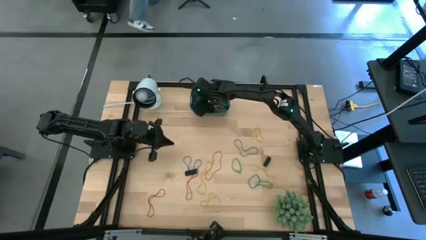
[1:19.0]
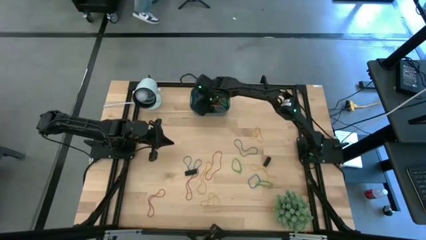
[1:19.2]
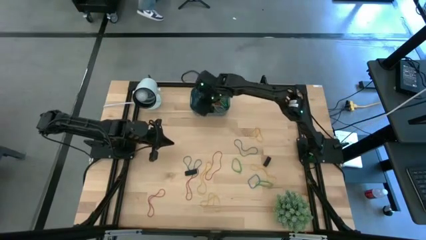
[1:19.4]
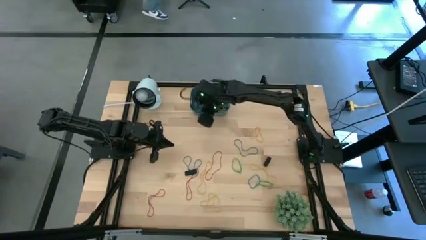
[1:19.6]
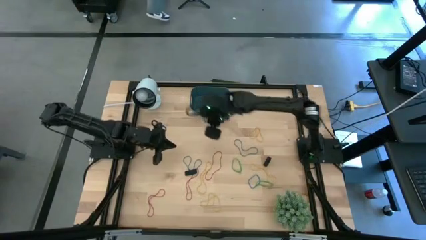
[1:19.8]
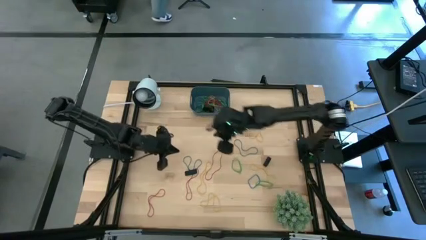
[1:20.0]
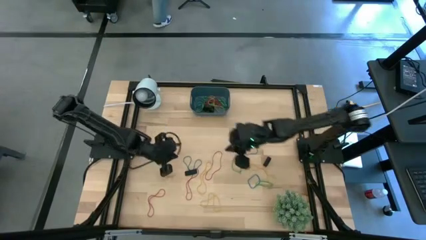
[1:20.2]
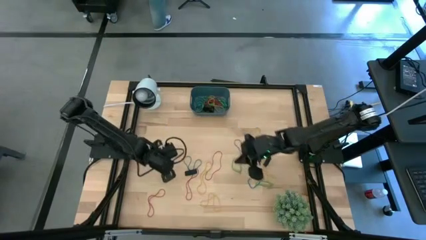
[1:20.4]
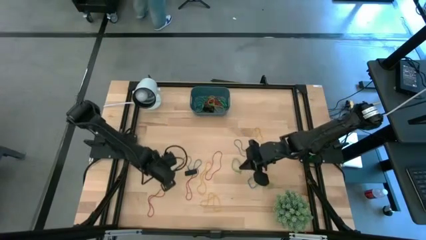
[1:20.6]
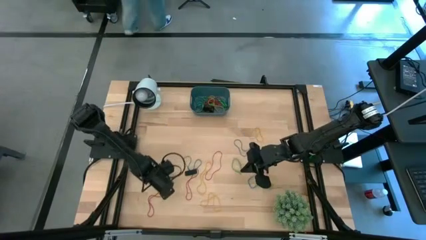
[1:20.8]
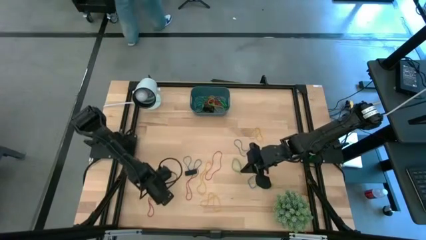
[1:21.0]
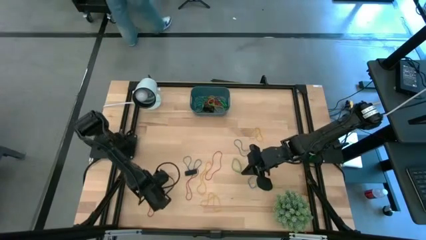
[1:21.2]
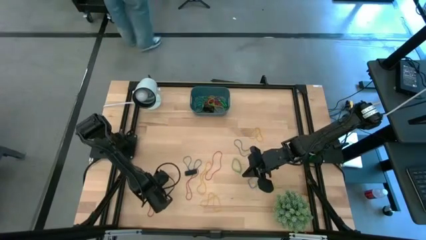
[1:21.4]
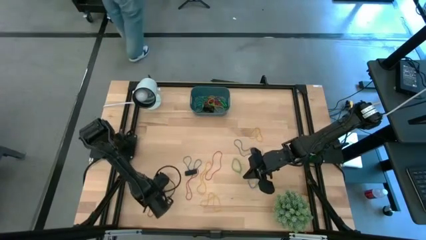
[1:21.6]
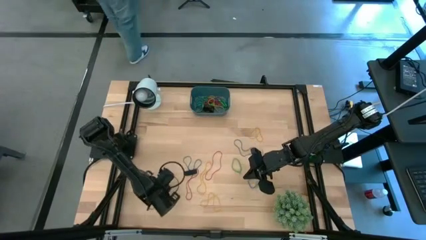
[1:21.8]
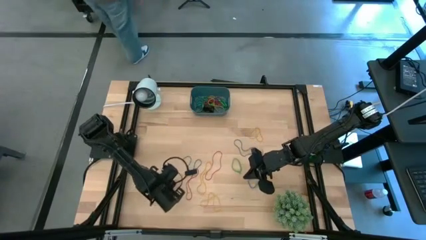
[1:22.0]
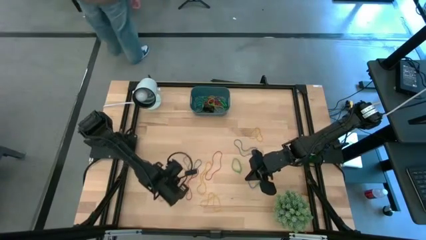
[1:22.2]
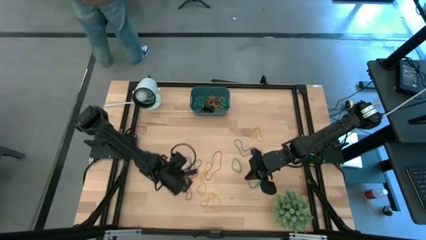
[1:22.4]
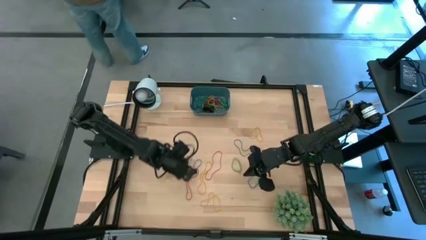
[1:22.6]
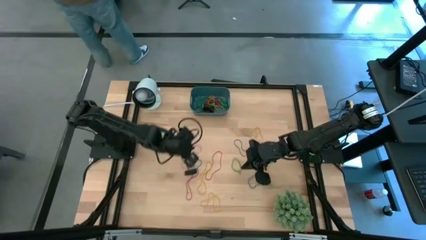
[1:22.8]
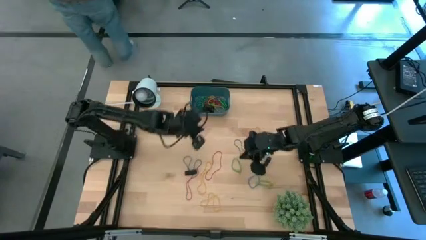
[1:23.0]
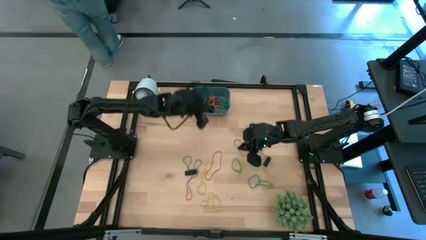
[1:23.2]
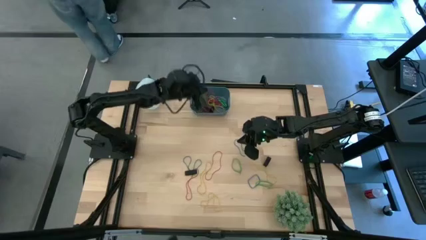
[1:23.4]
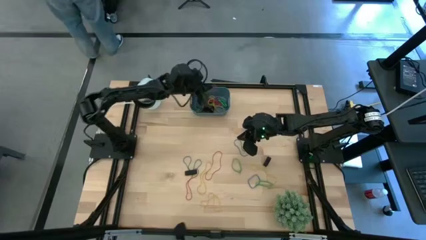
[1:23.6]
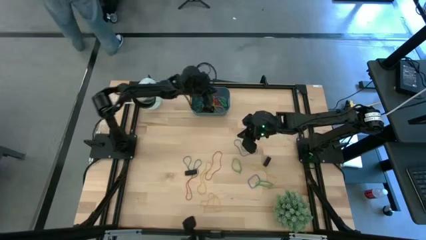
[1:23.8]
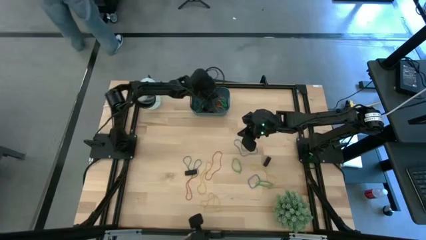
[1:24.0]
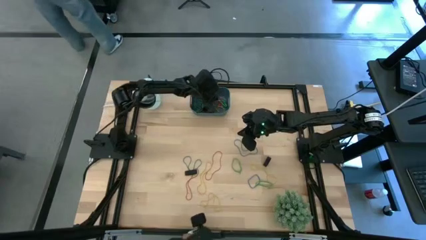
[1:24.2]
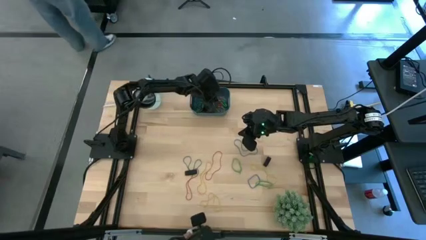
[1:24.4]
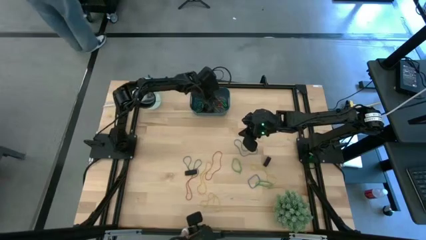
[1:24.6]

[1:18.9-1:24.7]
Task: Pick and place rubber bands into bin
Put the red rubber band into the blue bin

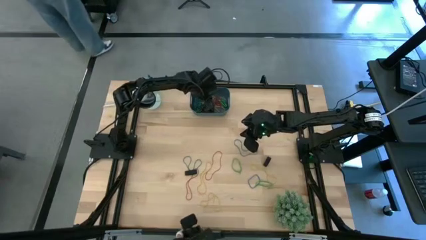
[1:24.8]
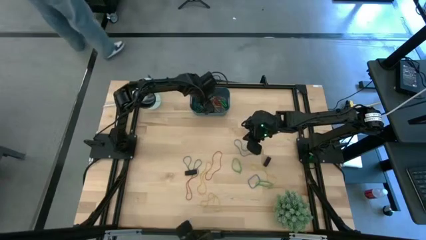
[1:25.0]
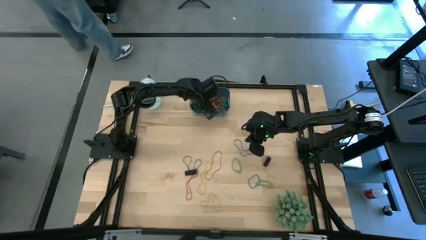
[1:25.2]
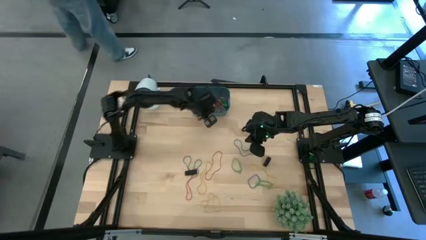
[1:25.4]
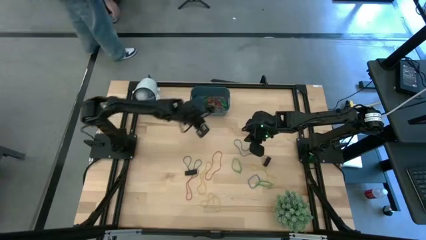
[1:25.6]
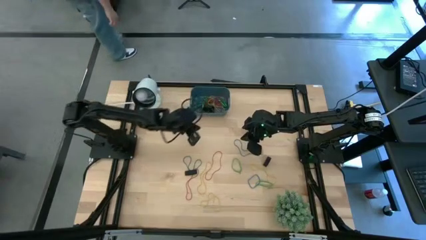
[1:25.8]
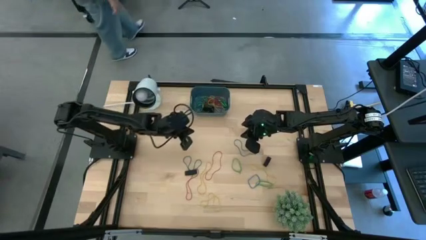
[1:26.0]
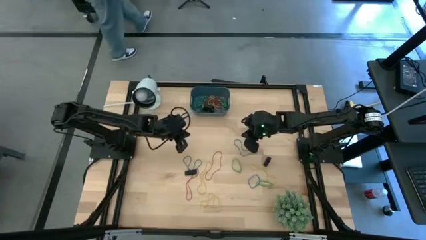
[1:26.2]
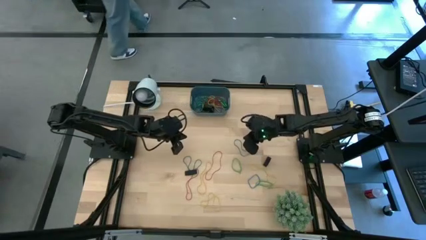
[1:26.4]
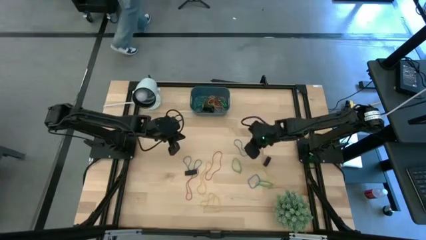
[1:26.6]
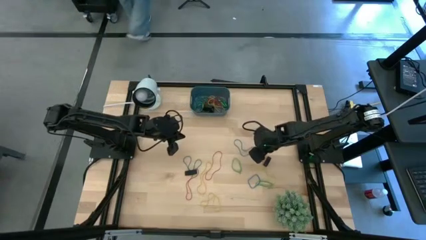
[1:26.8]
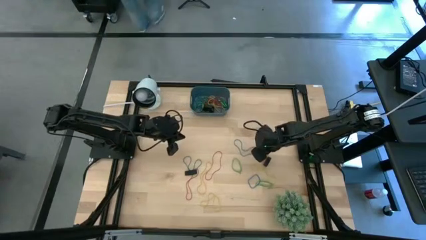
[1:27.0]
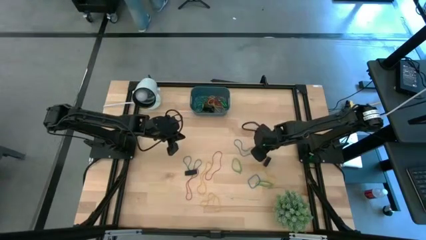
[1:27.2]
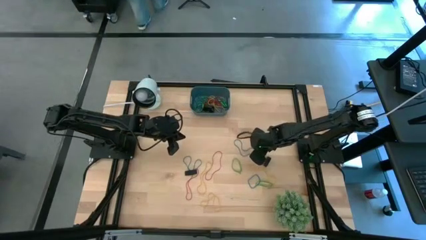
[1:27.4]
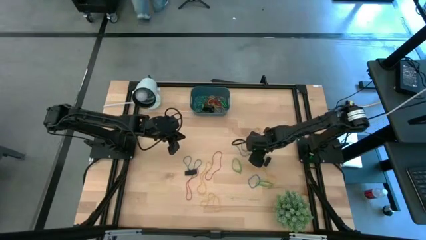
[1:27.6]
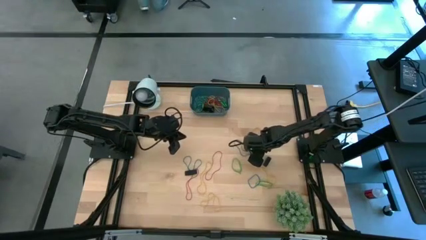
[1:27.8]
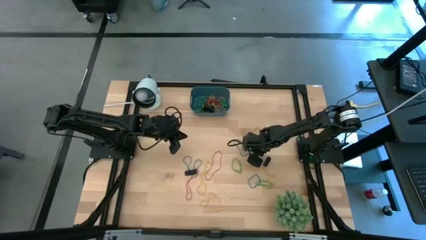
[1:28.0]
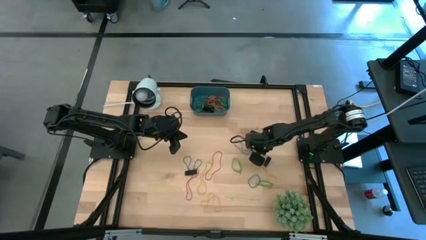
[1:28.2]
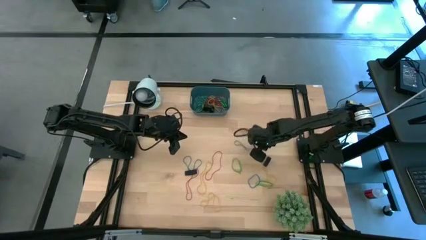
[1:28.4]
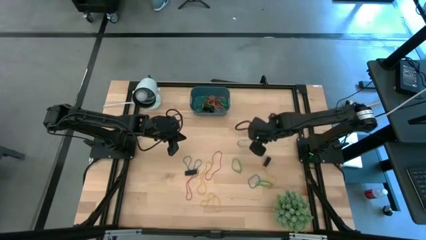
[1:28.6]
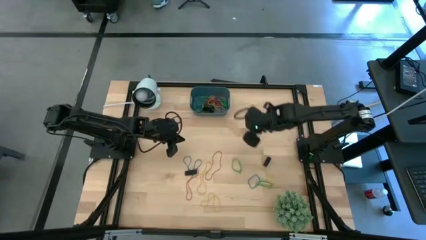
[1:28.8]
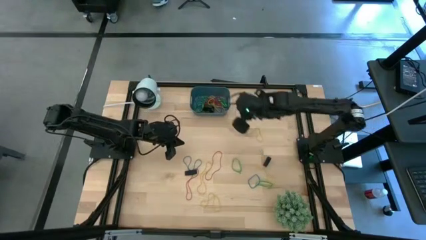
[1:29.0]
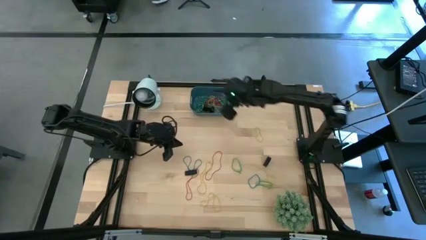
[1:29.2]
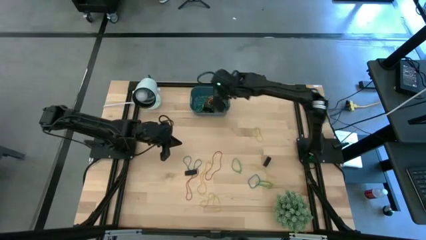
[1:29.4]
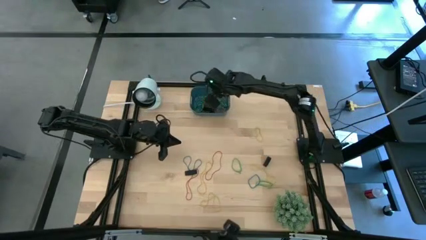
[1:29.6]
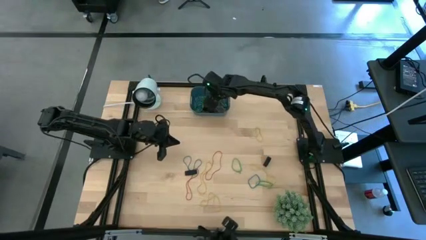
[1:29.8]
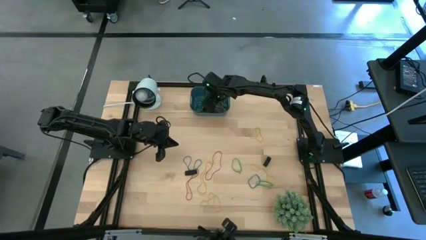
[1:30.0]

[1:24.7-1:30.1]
Put the blue rubber band into the blue bin

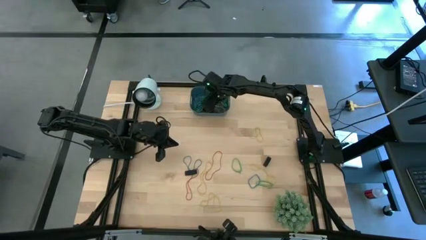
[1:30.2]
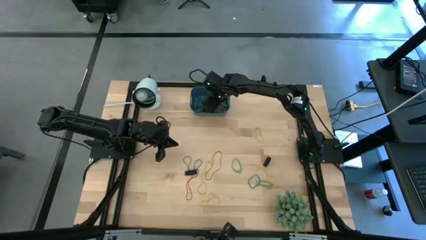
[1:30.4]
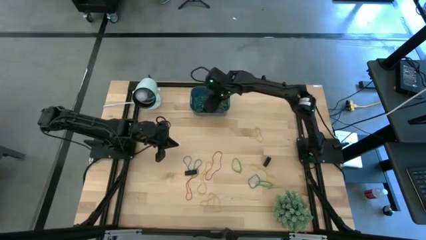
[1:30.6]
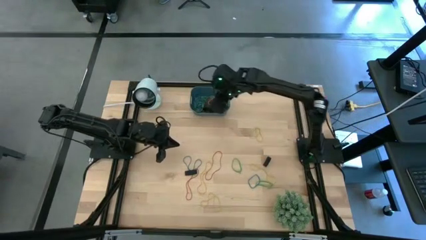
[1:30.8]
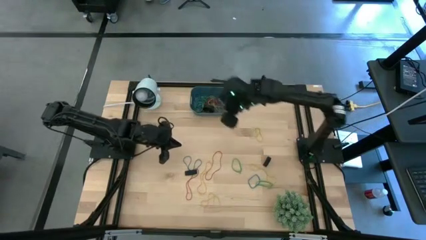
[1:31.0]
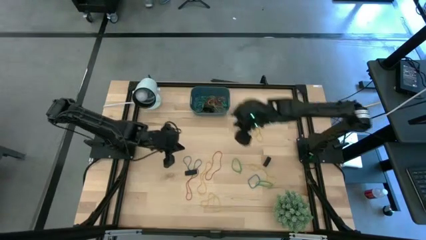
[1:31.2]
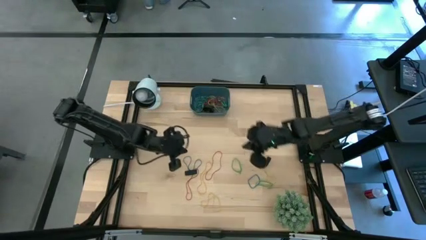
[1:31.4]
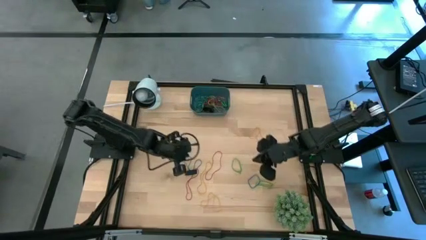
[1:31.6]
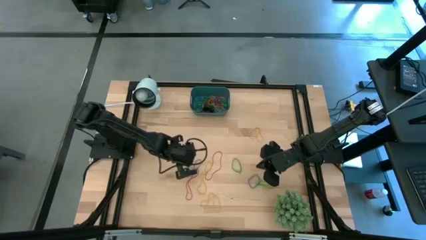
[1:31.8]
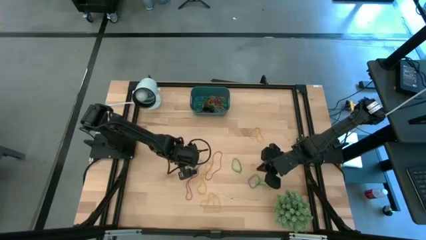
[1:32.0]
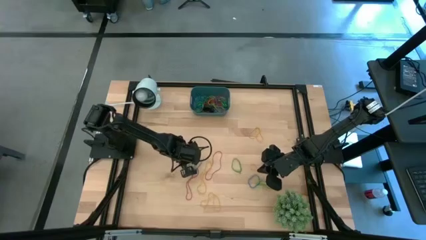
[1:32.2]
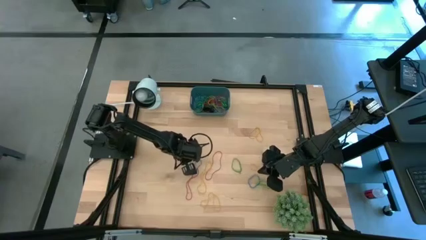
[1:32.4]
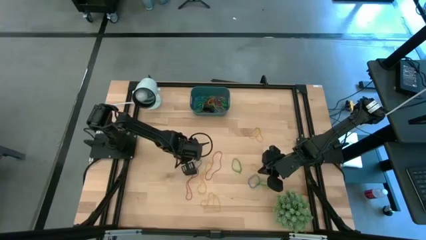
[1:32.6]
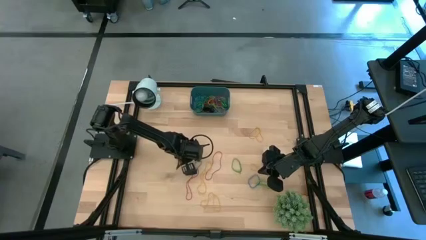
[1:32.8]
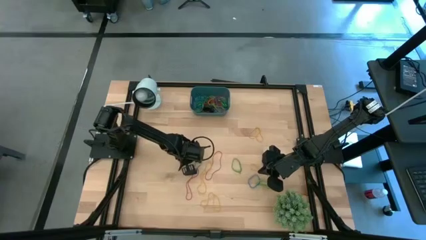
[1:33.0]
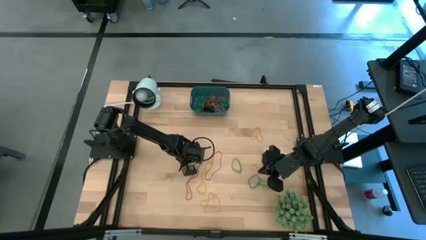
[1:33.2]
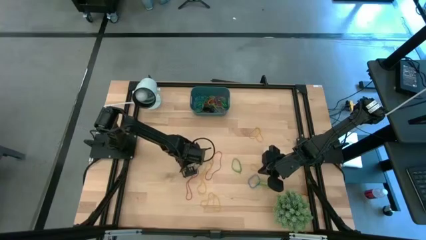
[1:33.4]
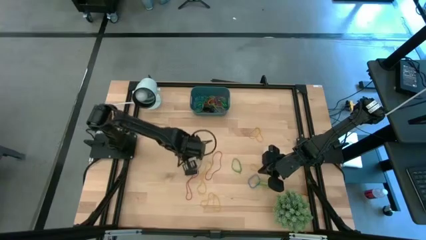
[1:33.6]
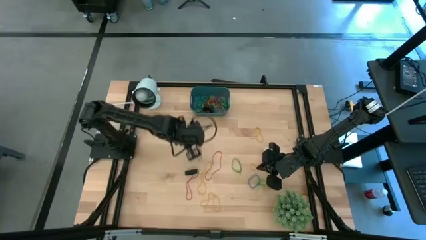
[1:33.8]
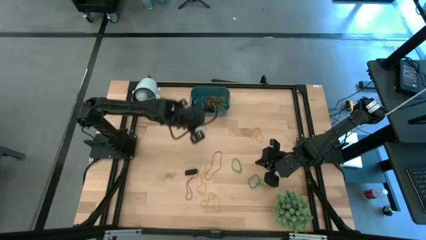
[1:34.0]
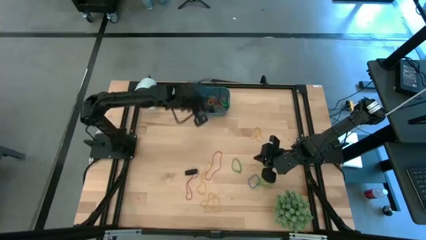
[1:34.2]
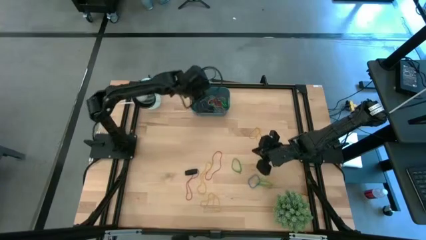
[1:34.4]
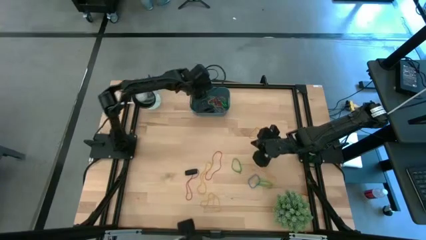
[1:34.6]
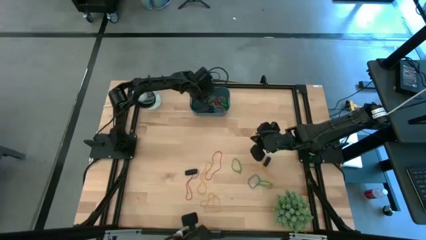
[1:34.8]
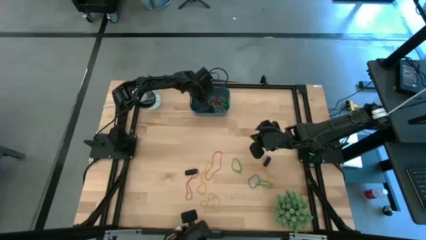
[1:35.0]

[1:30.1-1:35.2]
Put the blue rubber band into the blue bin

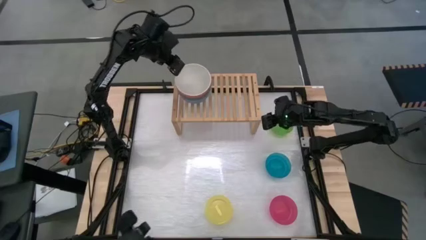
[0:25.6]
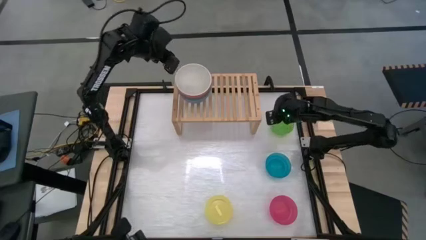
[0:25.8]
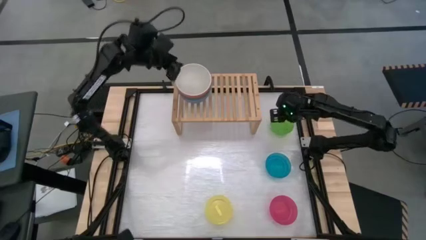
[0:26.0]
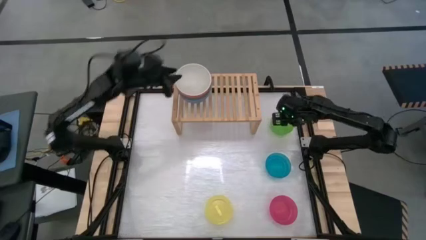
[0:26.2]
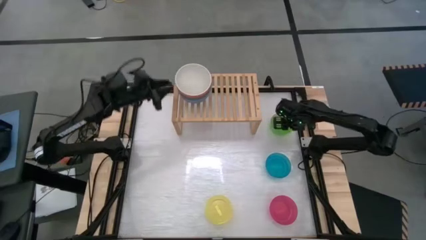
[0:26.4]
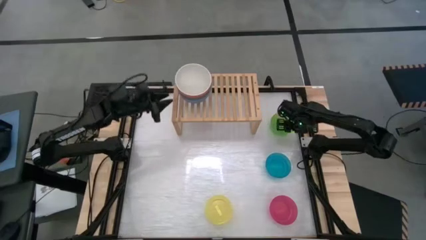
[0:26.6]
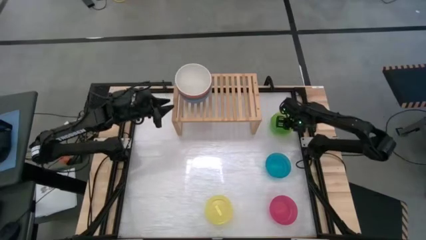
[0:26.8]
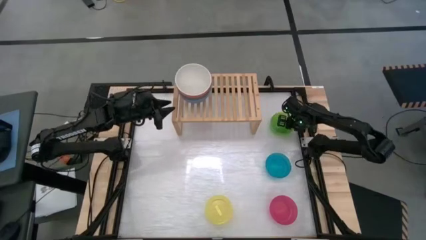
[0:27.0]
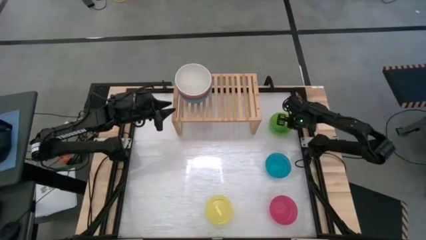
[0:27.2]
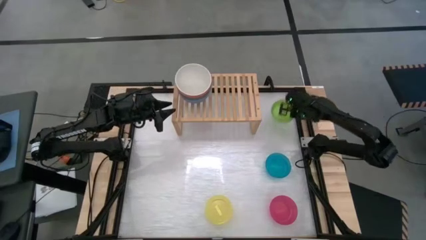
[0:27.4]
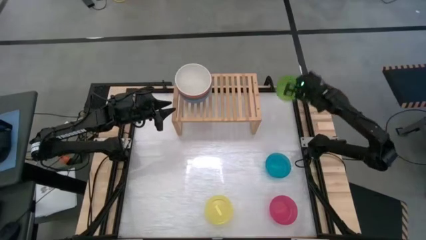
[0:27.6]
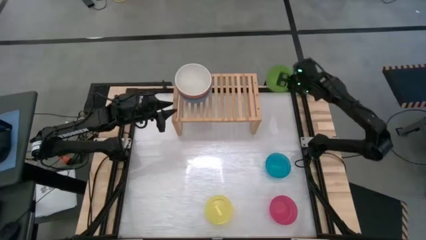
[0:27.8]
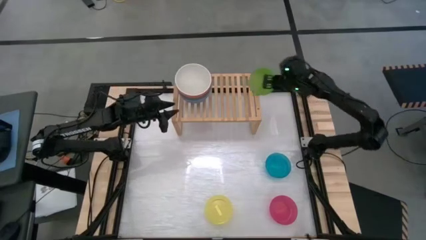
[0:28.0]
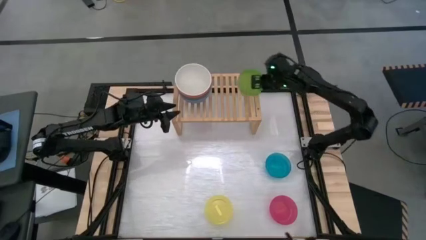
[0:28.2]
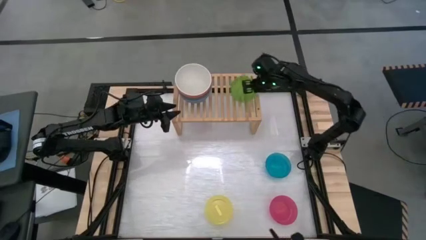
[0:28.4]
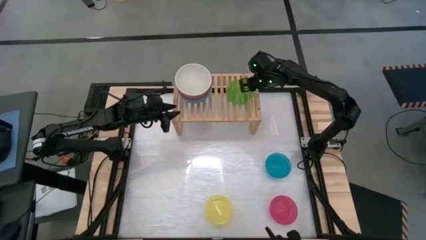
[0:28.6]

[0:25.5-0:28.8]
Task: Place and stack bowls onto a shelf
Put the green bowl onto the shelf
